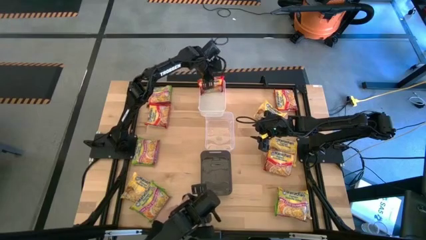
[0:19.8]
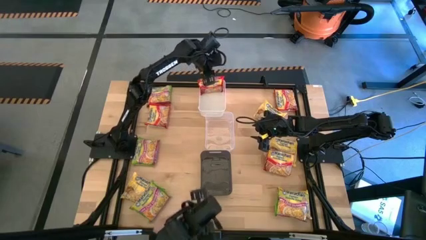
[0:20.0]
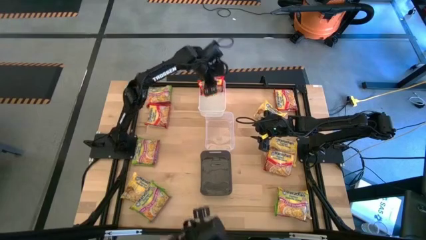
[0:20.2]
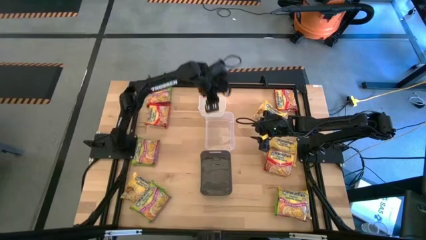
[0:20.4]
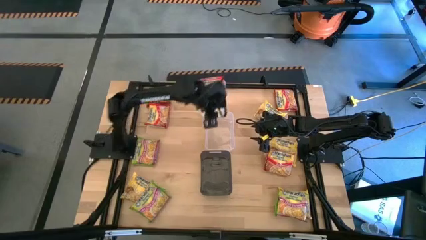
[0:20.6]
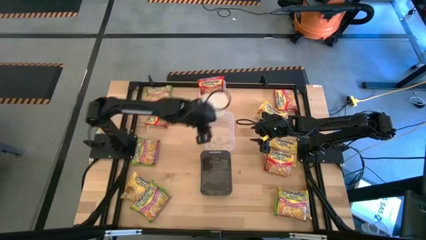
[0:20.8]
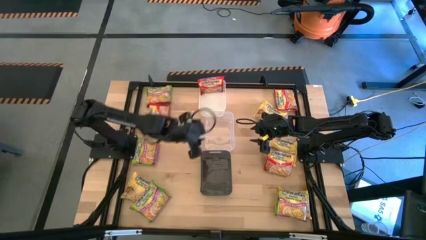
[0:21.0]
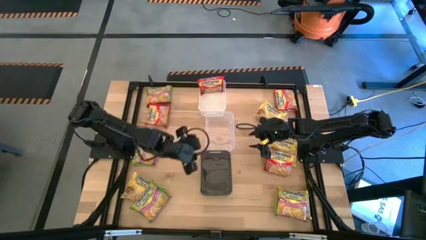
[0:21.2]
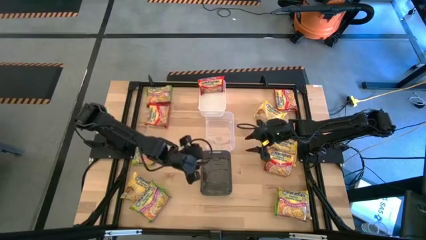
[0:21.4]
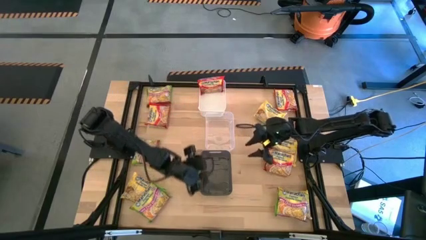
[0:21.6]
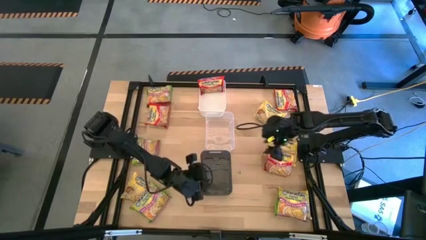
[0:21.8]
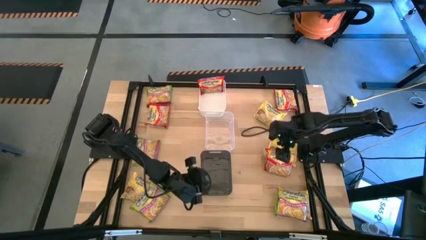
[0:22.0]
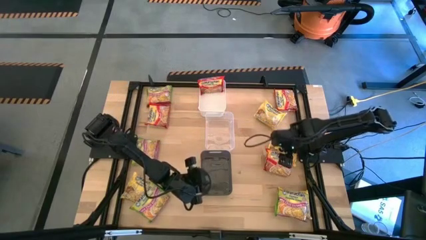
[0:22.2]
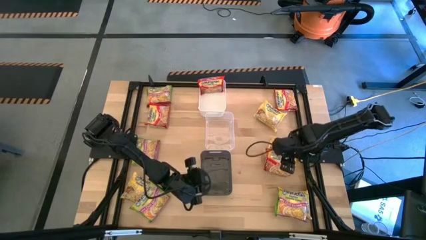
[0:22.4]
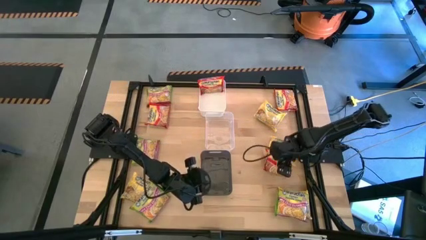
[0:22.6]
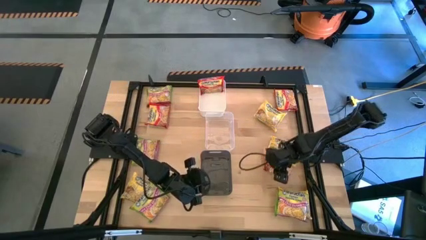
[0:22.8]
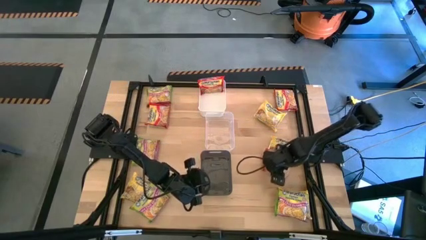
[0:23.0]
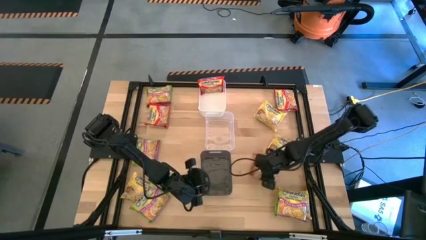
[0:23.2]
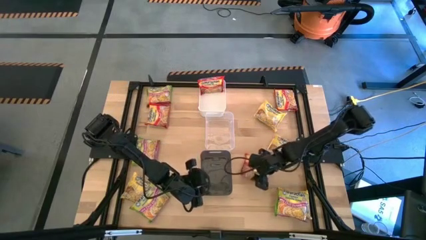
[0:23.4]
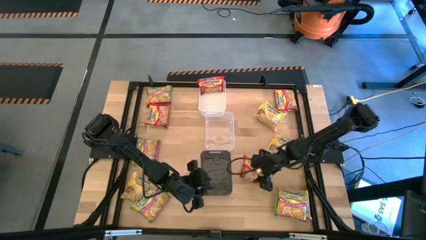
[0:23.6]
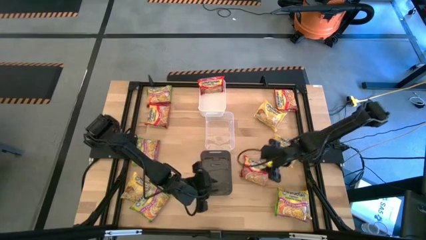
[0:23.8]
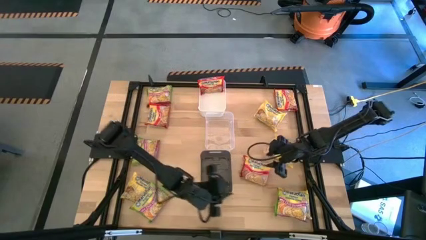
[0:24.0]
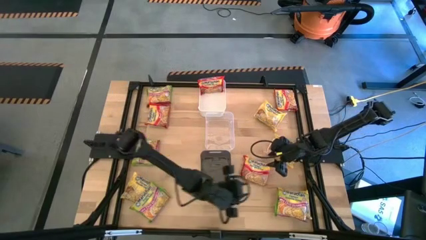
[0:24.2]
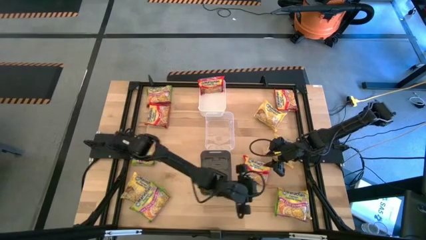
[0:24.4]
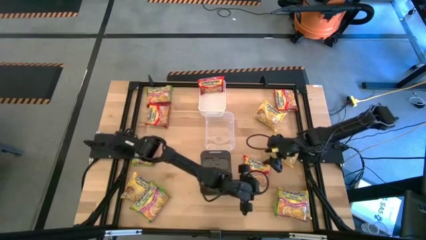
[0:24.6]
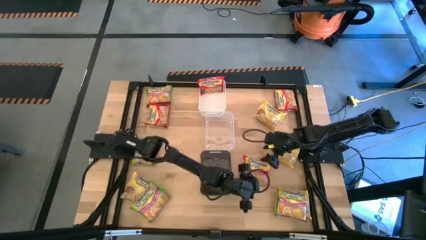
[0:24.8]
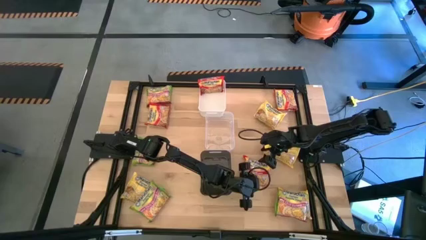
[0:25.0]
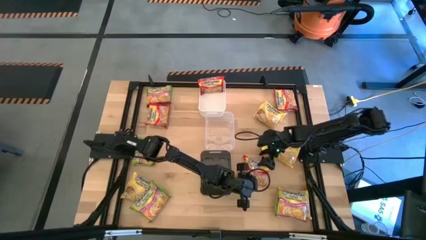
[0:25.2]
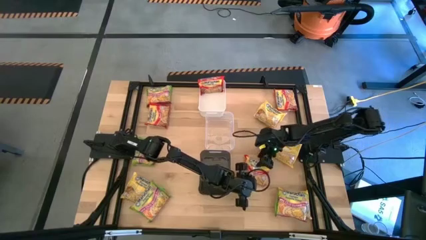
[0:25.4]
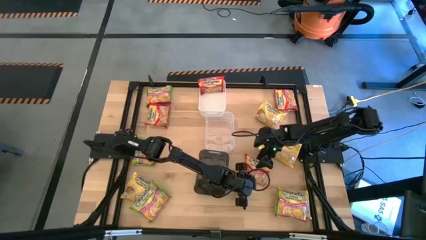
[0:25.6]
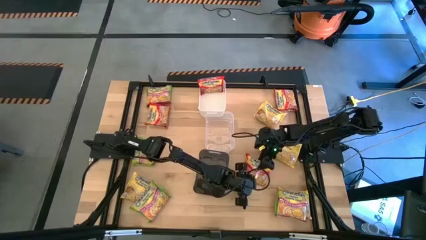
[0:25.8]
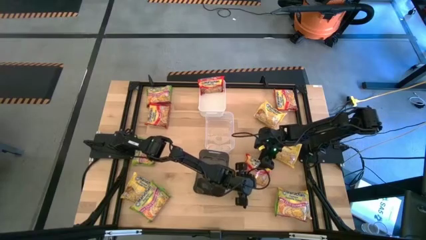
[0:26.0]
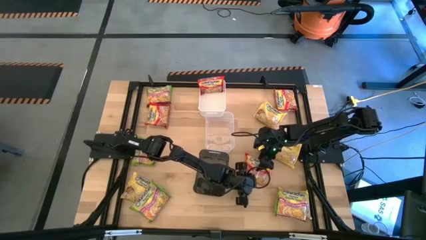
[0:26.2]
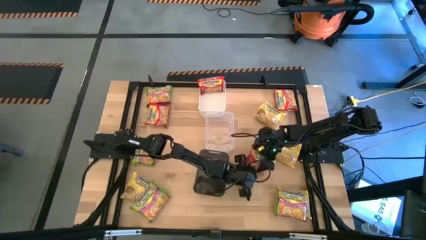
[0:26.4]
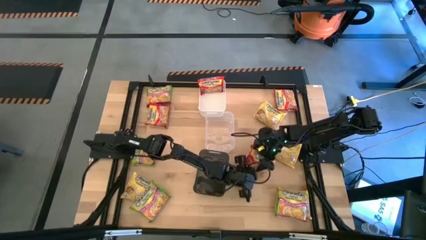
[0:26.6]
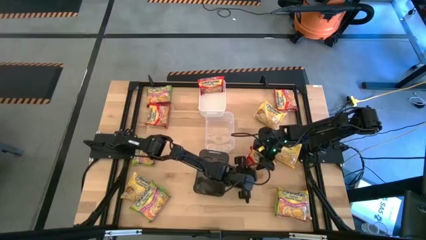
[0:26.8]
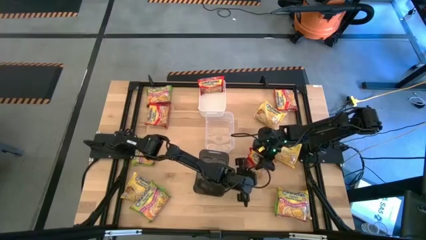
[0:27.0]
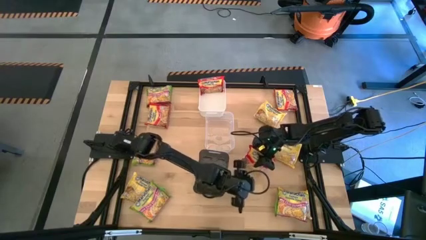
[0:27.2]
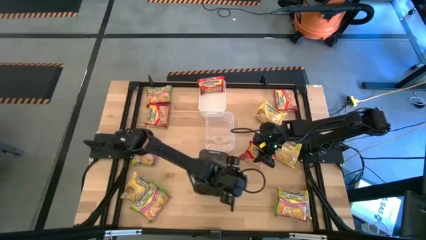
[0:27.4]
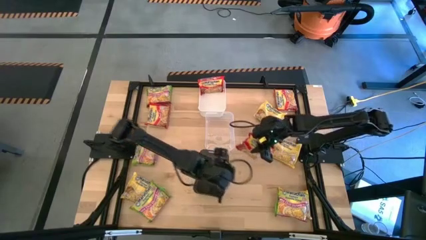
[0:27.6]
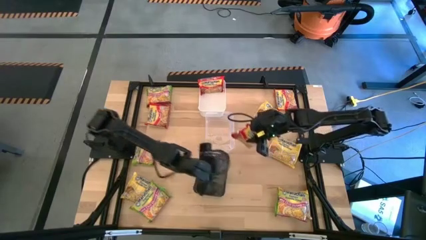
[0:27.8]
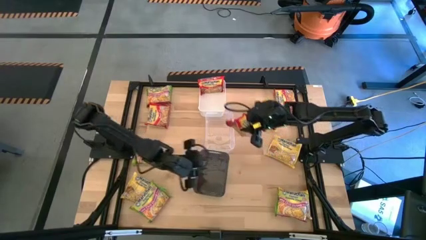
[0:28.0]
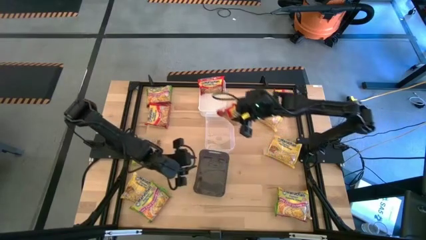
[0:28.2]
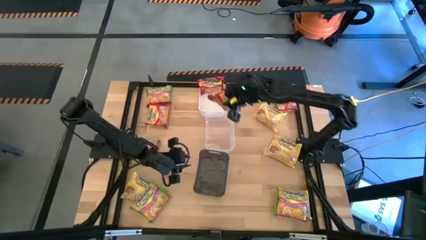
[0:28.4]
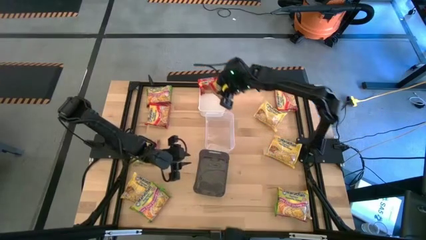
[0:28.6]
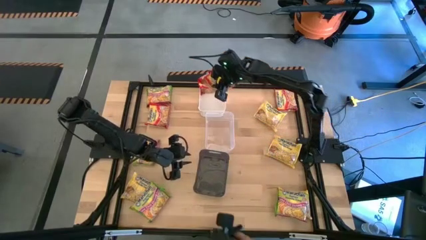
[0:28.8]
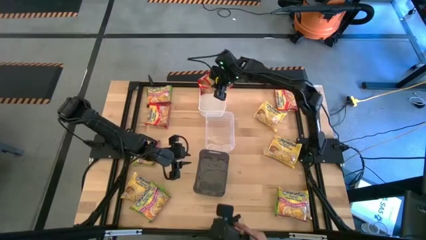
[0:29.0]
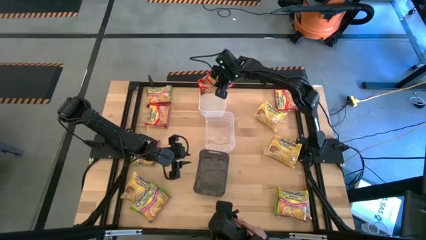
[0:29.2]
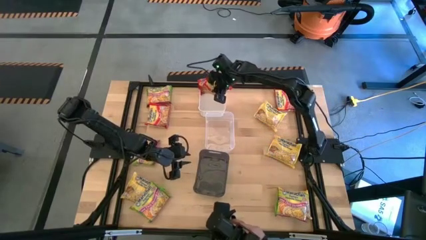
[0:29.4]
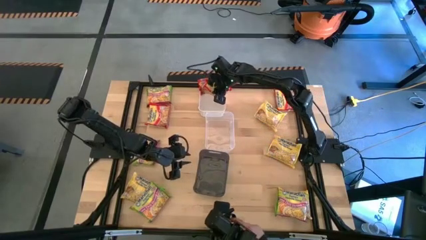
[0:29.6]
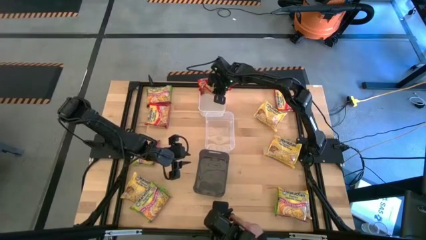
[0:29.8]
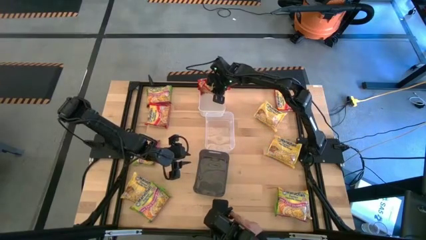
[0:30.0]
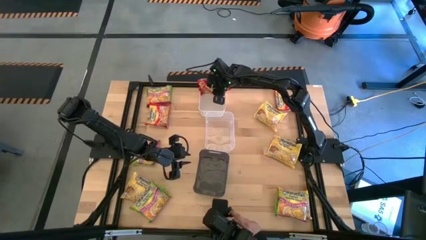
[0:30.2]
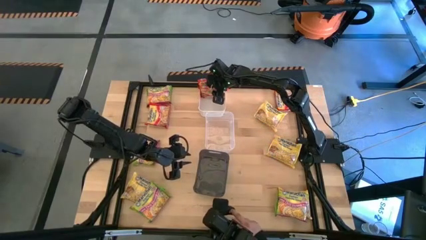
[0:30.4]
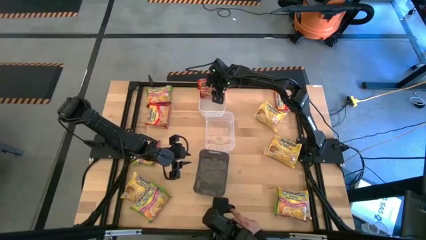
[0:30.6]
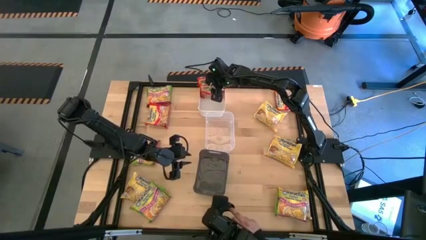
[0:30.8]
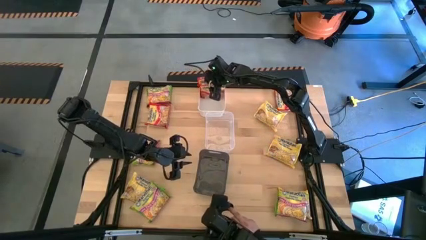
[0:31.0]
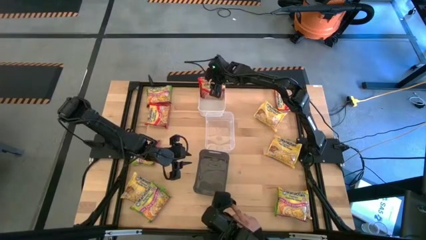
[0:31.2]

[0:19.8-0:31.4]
Task: Sort Maruchan noodles
Put the red noodle pack into the white bin
